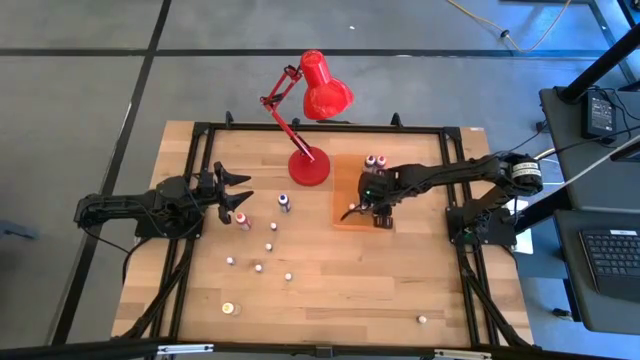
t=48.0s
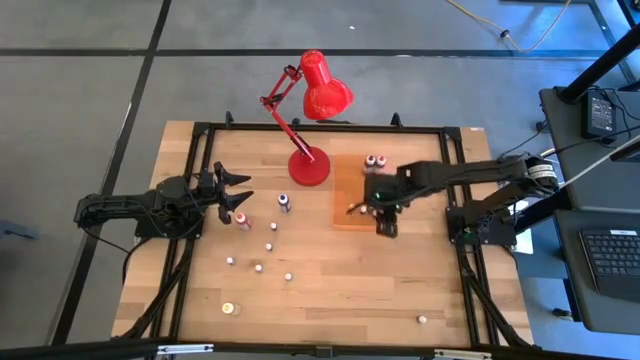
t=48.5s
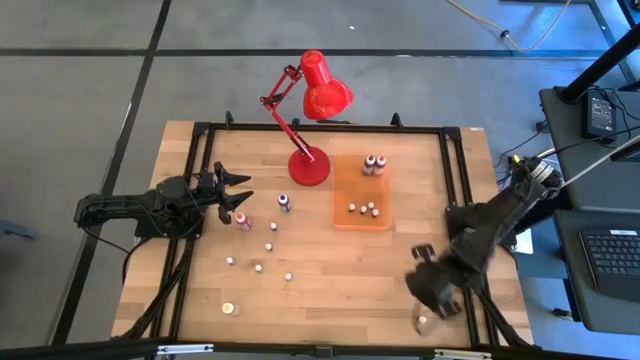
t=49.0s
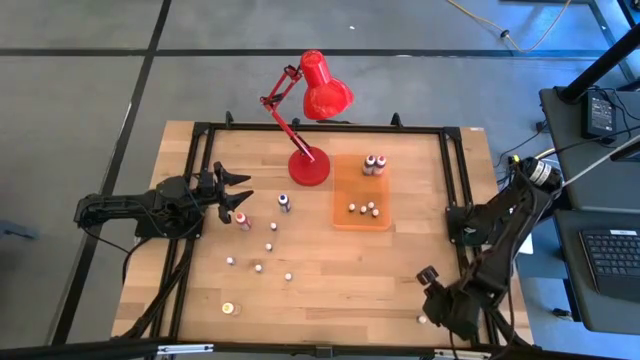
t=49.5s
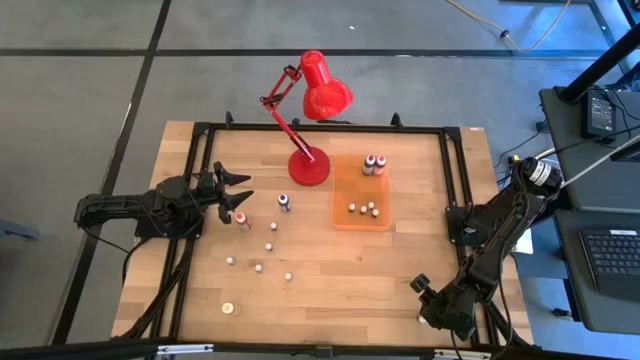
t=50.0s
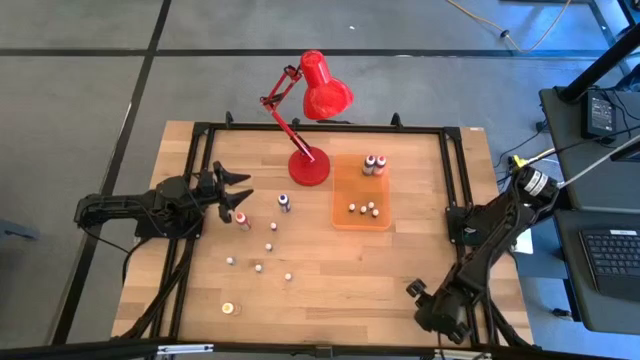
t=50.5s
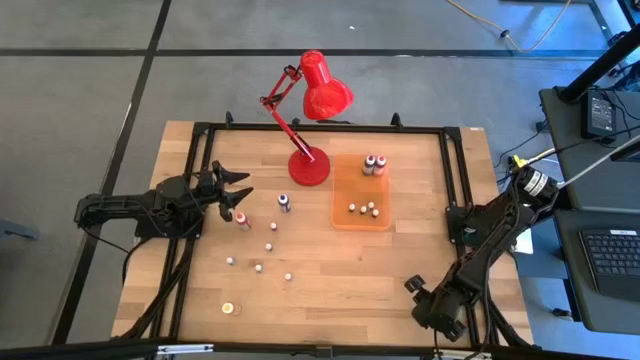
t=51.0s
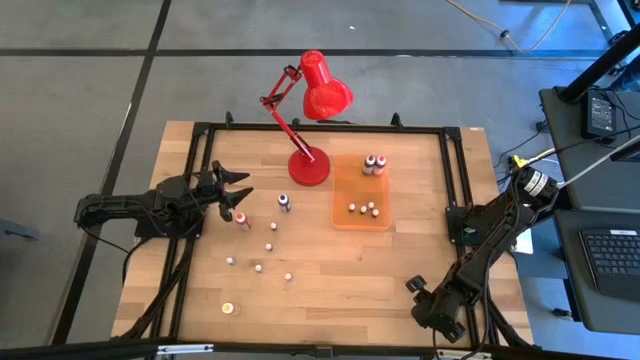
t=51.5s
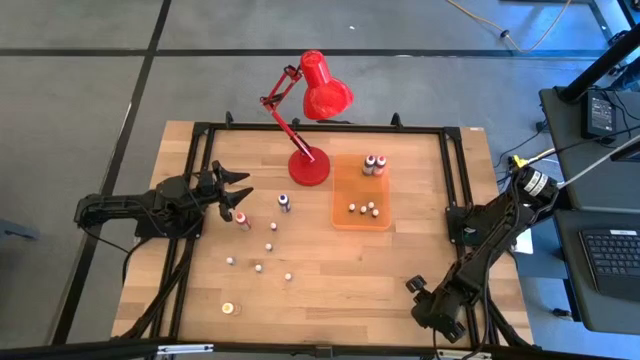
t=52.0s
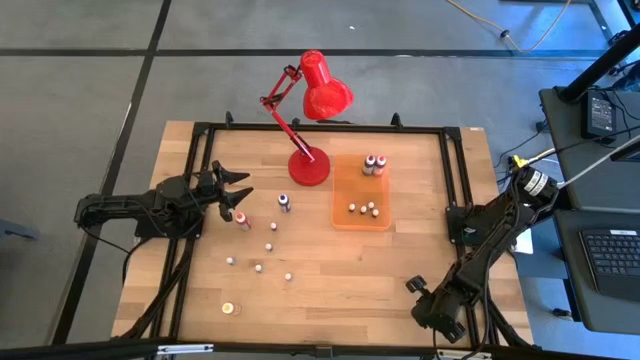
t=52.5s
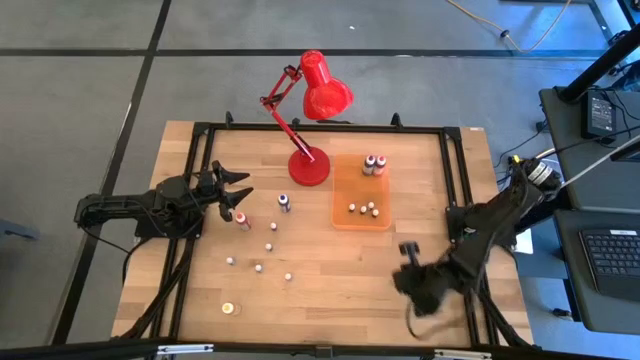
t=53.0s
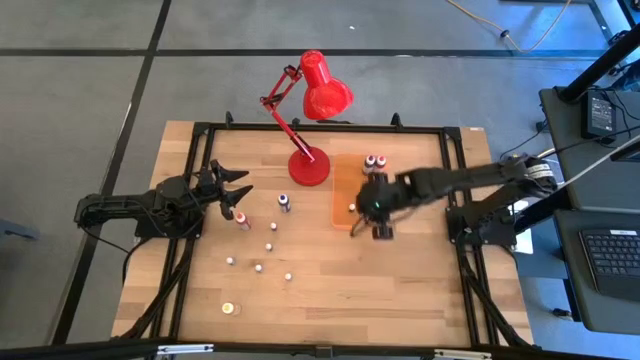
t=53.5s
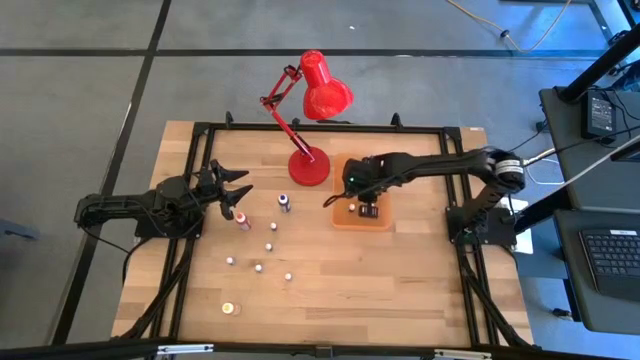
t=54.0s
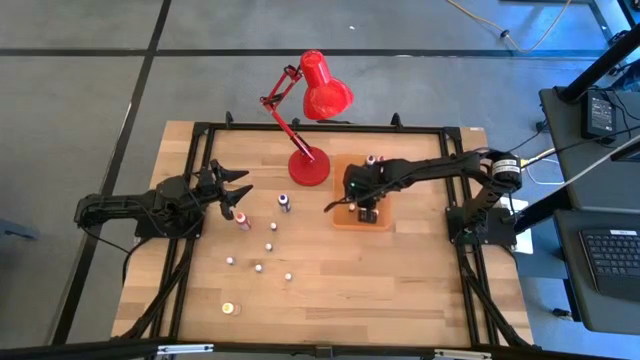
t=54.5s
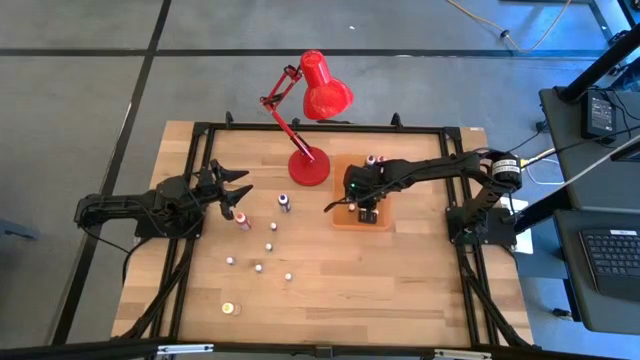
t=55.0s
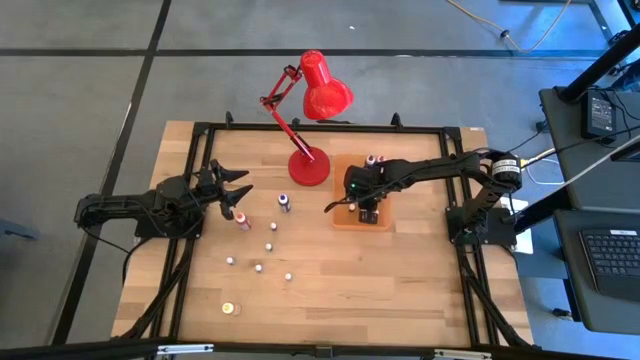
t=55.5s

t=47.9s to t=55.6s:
Task: Pick & Place food coloring
Put the right small green food coloring bottle into the orange bin

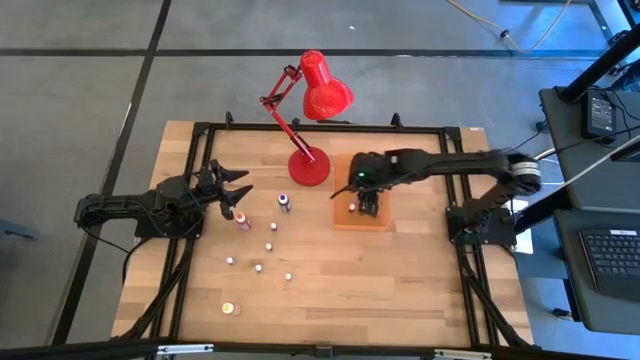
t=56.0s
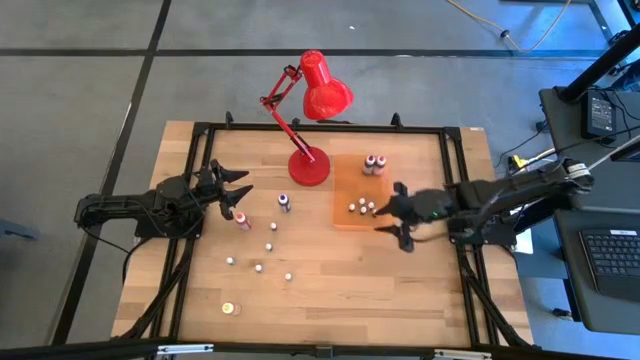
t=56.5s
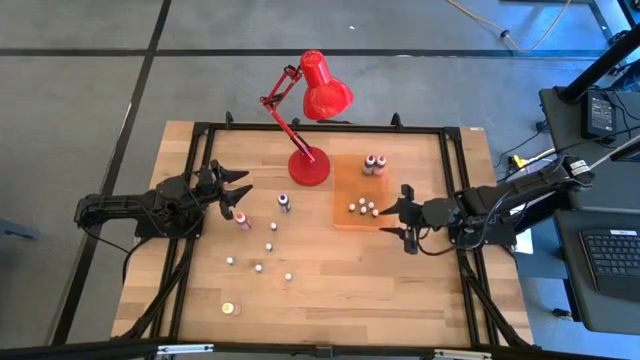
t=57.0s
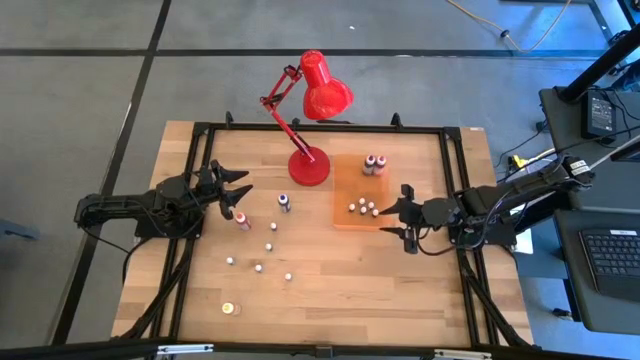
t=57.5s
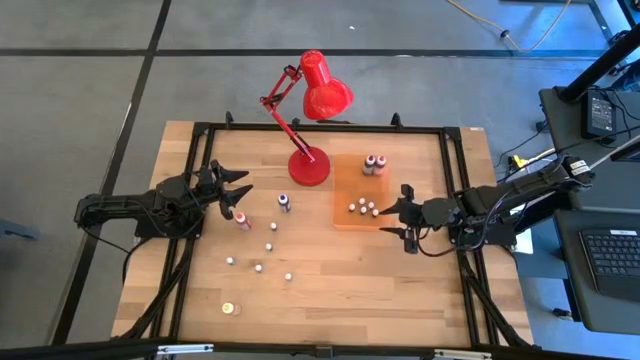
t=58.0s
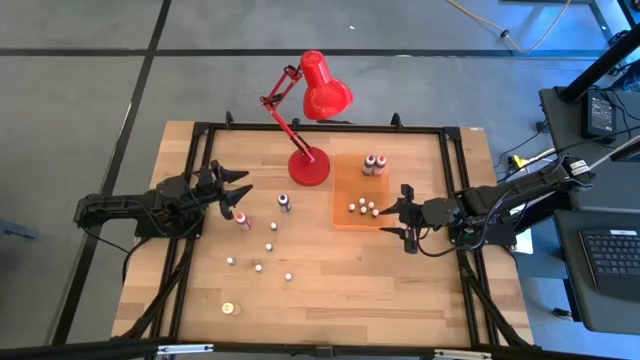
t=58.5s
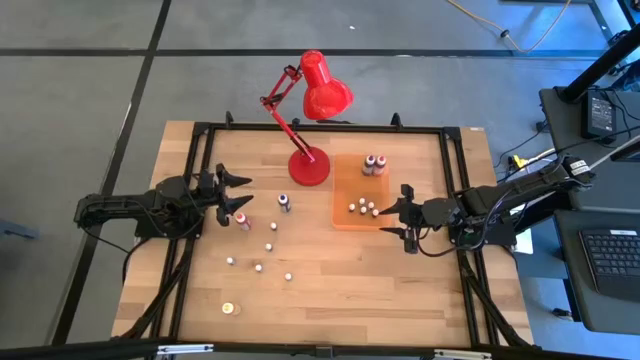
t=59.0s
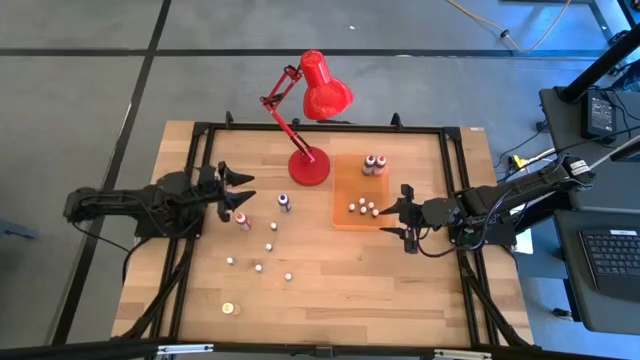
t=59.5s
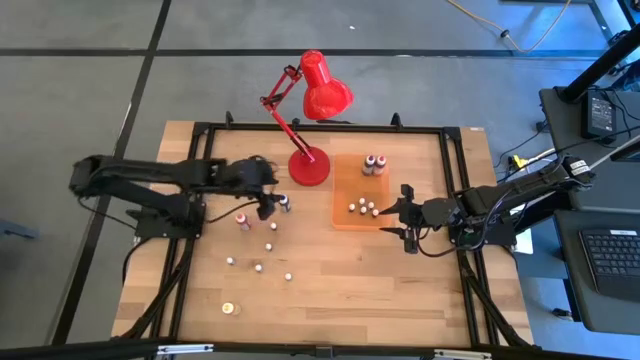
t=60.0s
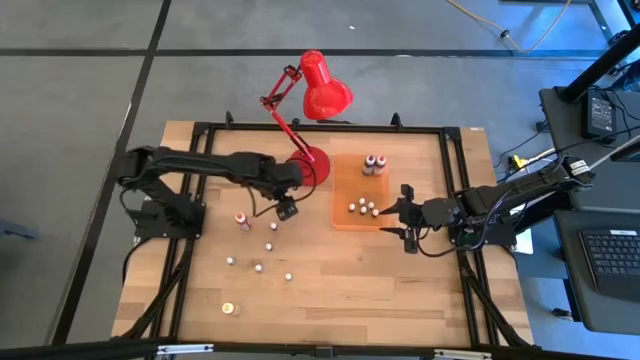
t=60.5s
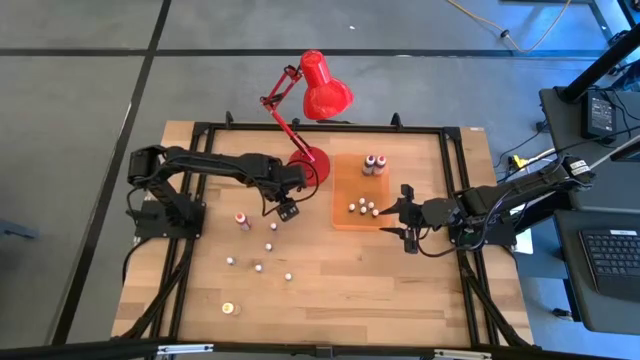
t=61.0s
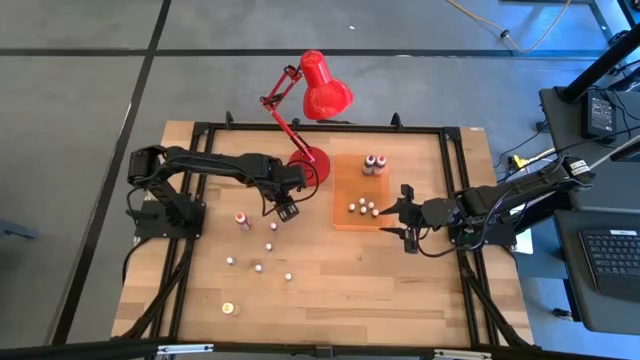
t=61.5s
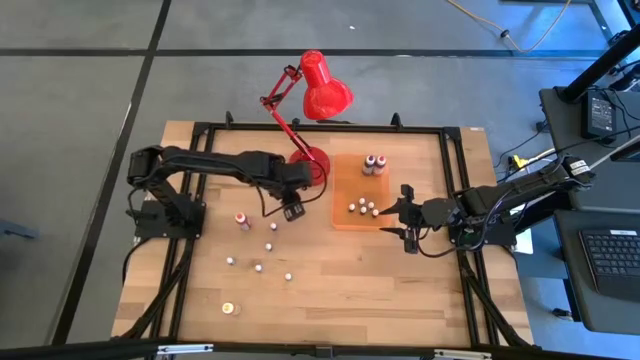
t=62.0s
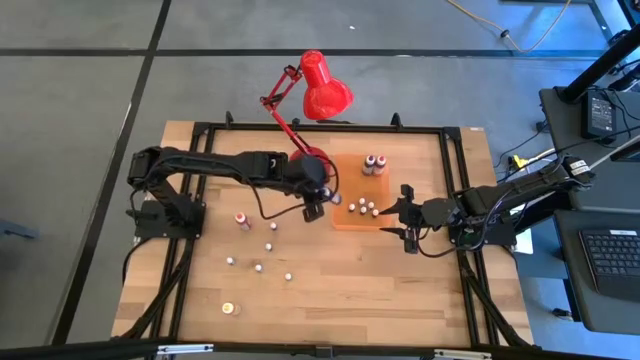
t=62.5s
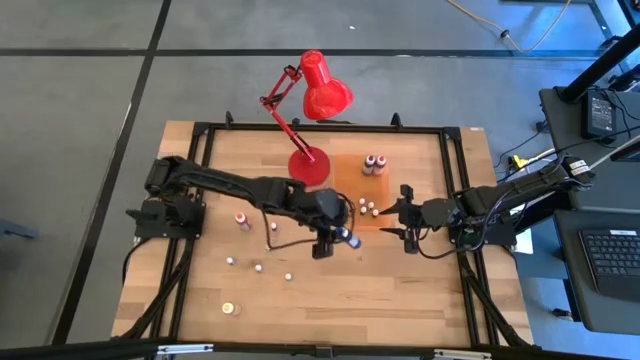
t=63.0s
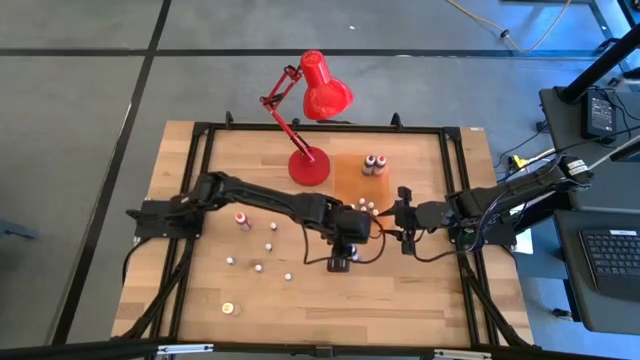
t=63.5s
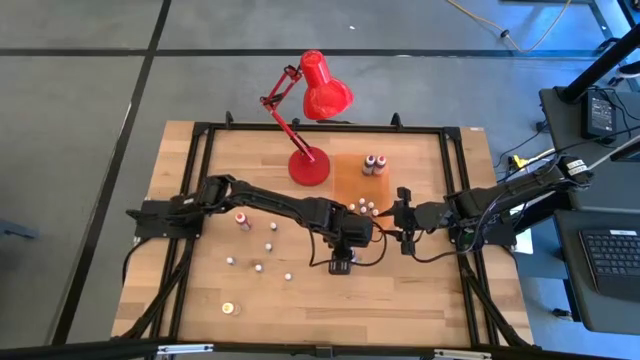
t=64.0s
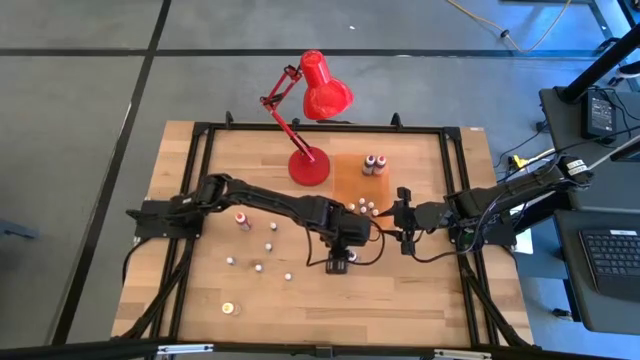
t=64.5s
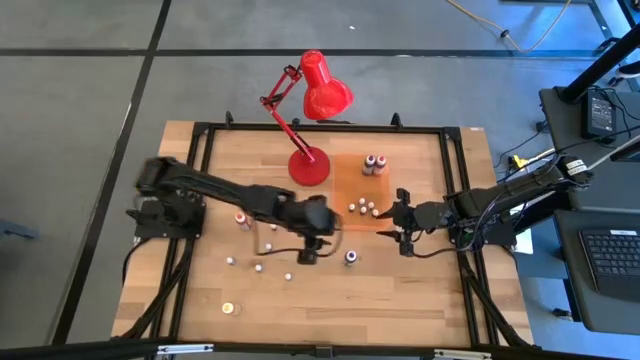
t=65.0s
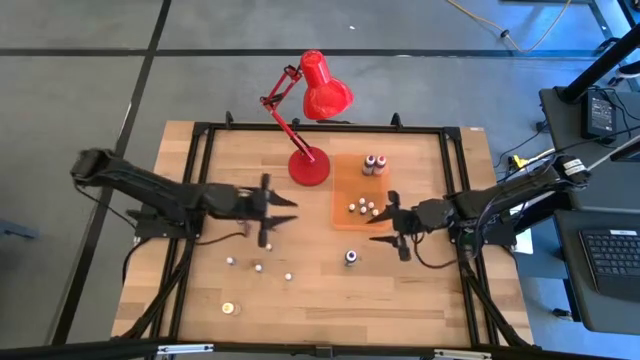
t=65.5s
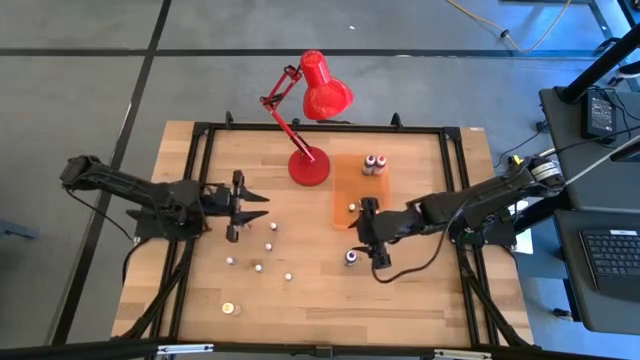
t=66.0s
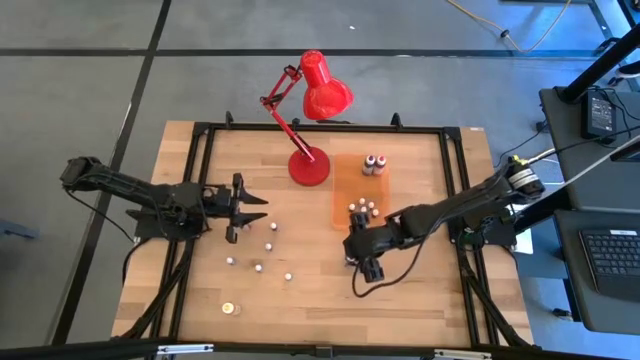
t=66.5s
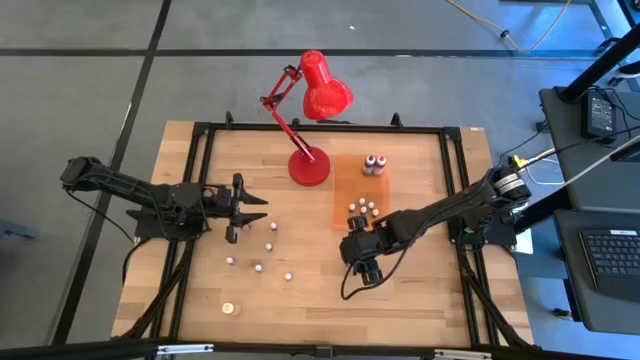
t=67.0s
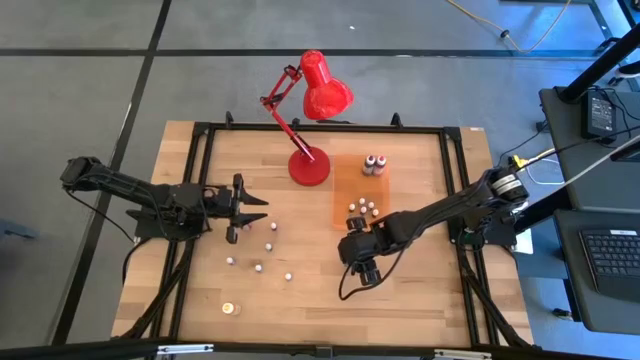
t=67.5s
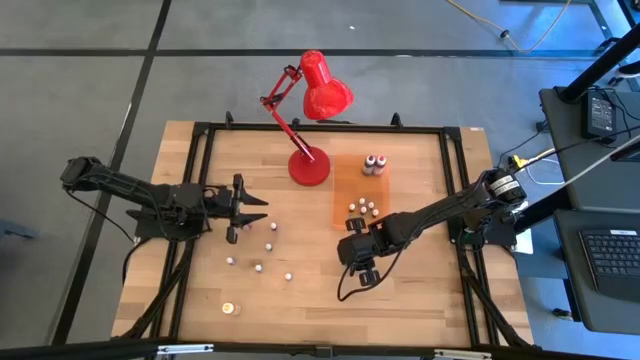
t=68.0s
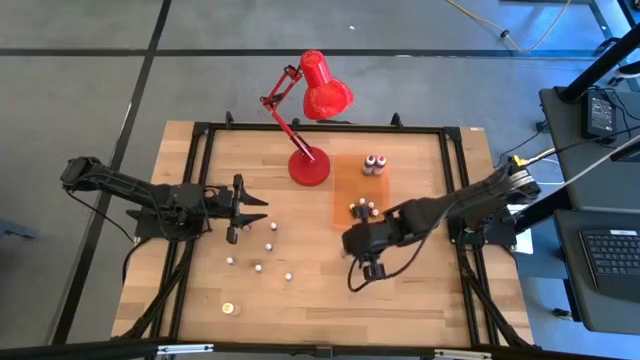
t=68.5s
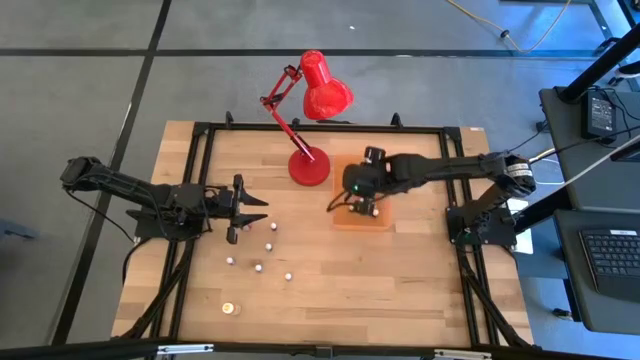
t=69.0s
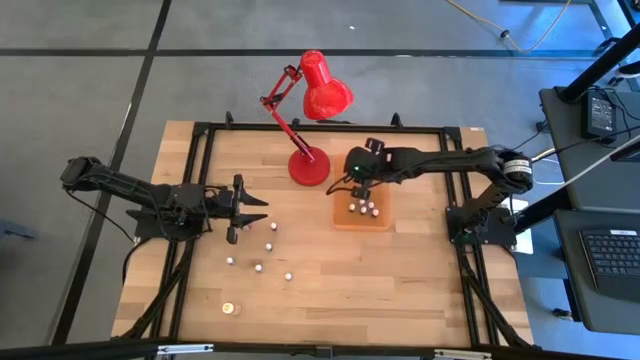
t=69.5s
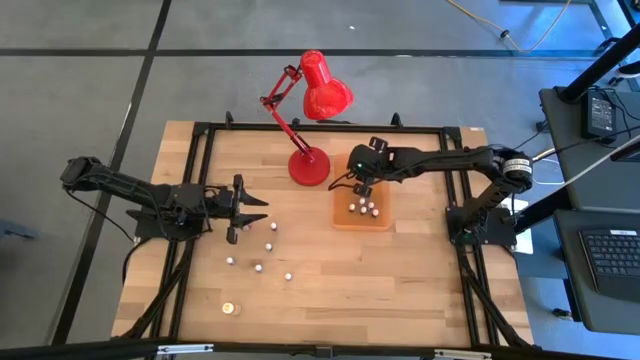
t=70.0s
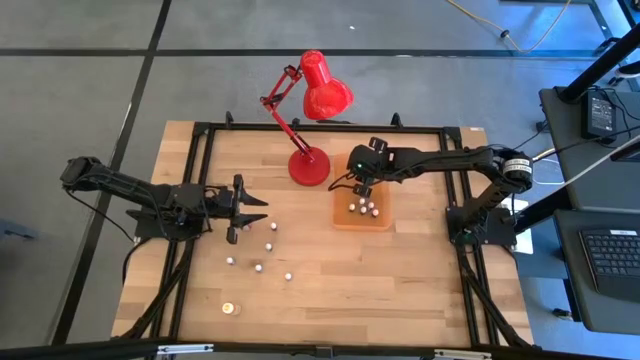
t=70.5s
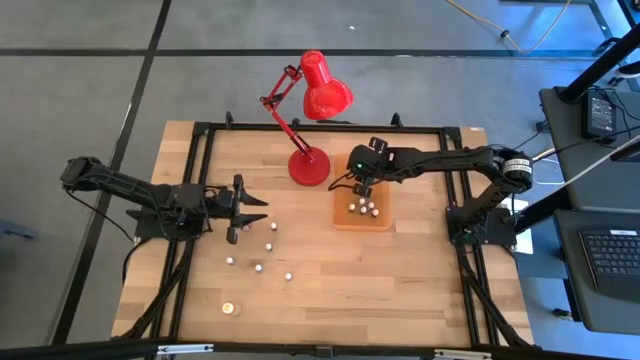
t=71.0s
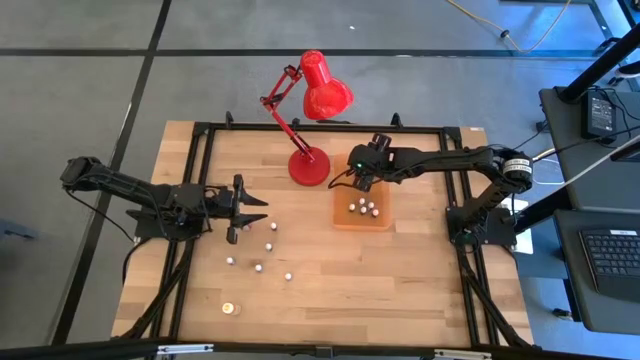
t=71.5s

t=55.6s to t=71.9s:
Put the large blue food coloring bottle into the orange bin
